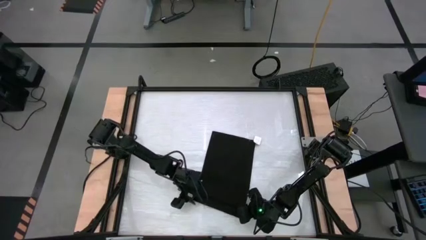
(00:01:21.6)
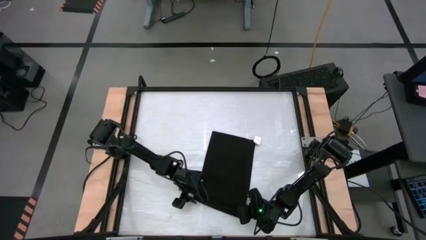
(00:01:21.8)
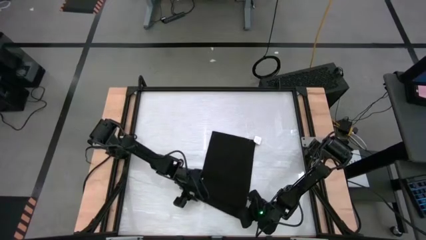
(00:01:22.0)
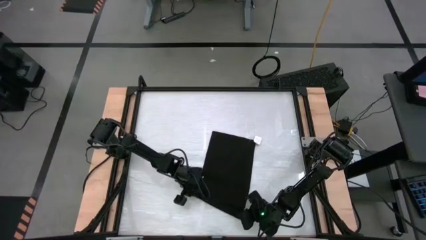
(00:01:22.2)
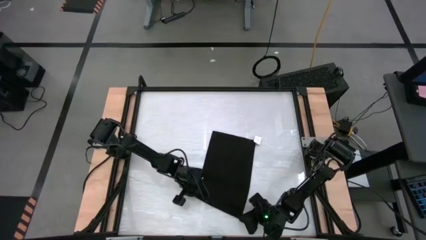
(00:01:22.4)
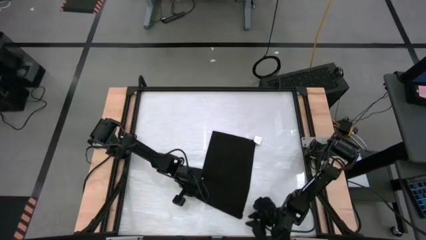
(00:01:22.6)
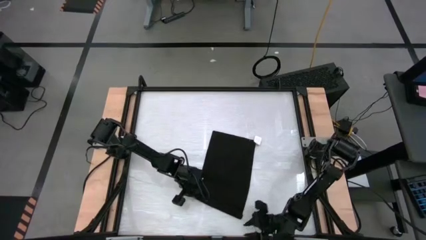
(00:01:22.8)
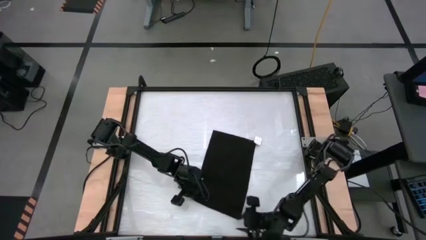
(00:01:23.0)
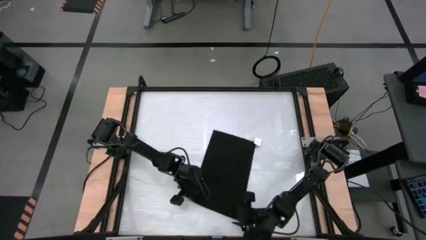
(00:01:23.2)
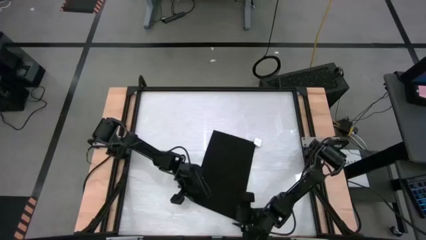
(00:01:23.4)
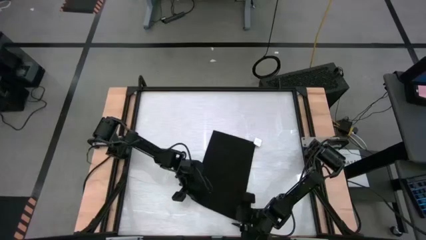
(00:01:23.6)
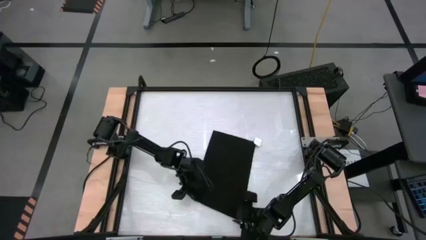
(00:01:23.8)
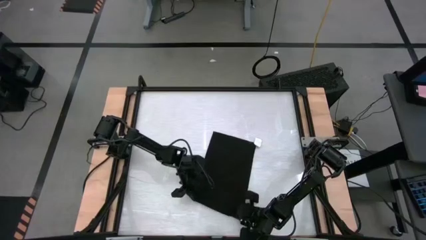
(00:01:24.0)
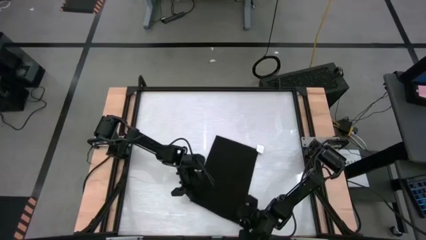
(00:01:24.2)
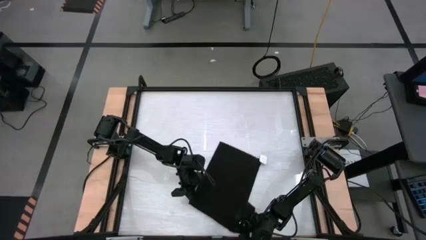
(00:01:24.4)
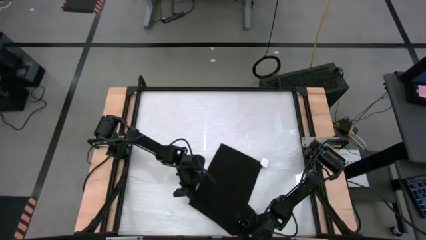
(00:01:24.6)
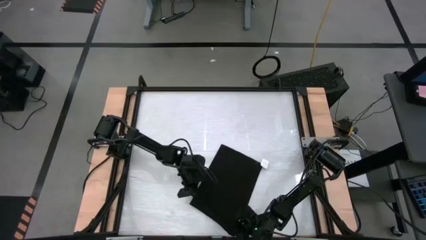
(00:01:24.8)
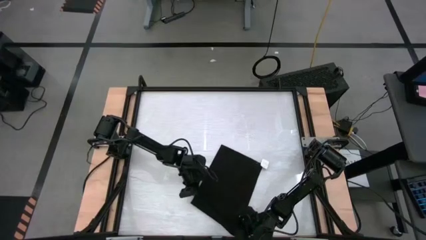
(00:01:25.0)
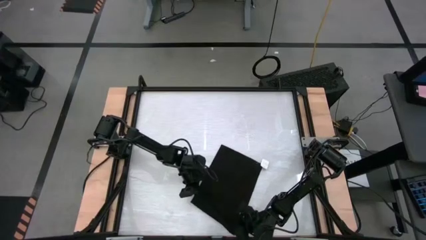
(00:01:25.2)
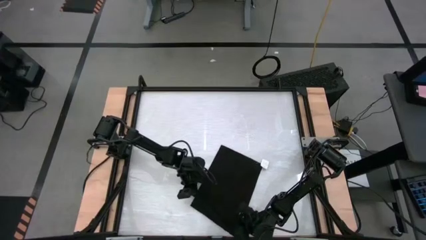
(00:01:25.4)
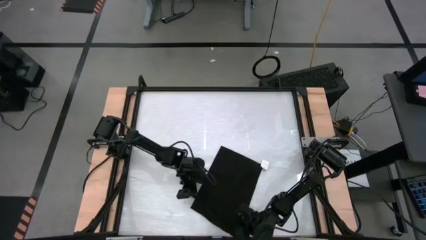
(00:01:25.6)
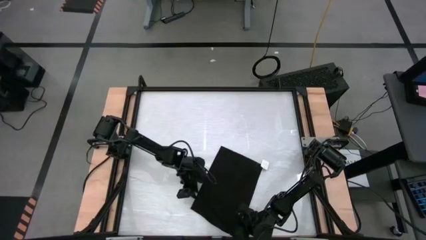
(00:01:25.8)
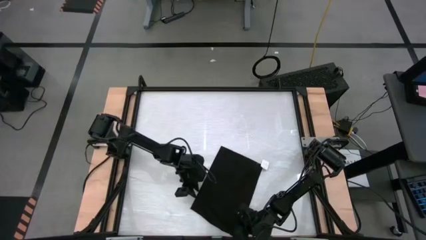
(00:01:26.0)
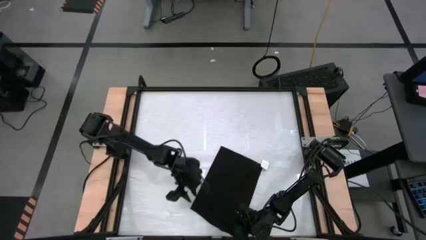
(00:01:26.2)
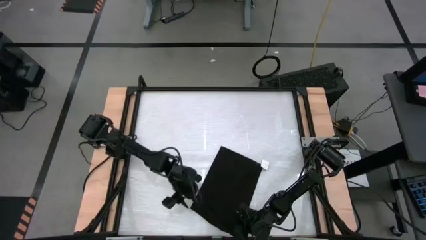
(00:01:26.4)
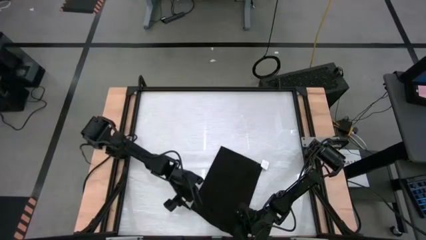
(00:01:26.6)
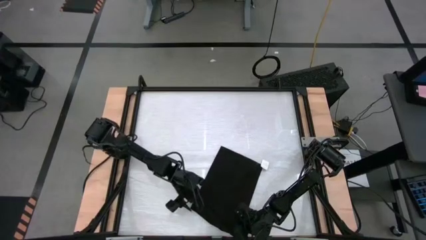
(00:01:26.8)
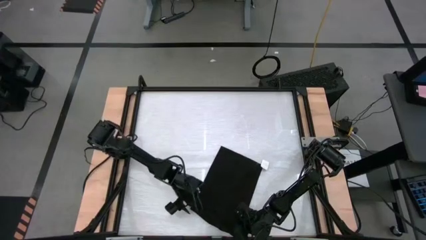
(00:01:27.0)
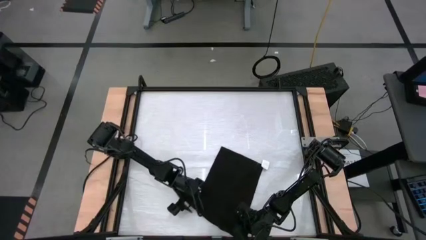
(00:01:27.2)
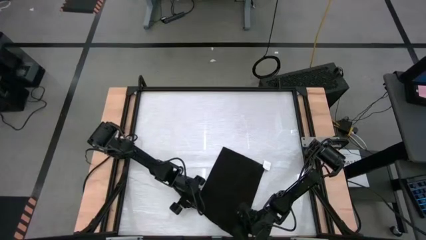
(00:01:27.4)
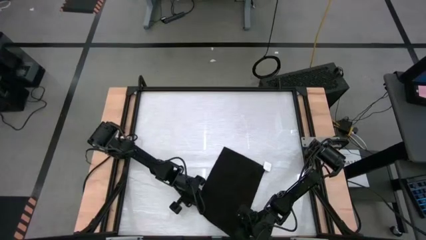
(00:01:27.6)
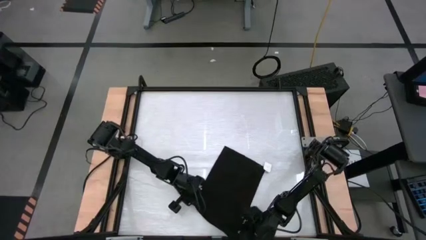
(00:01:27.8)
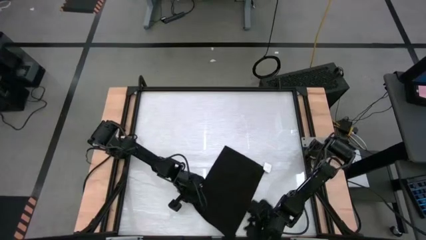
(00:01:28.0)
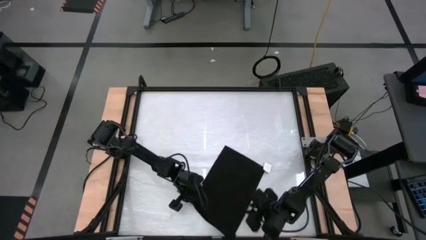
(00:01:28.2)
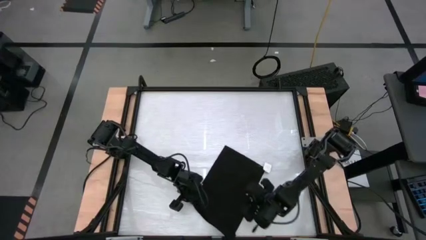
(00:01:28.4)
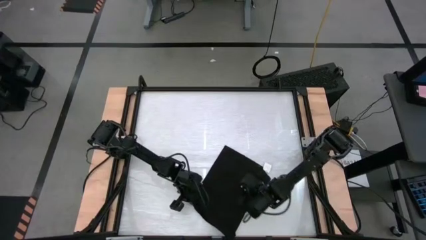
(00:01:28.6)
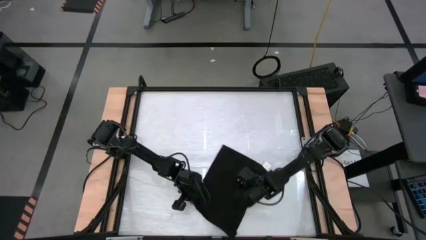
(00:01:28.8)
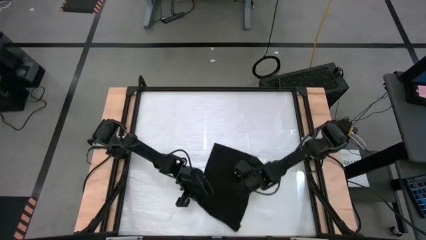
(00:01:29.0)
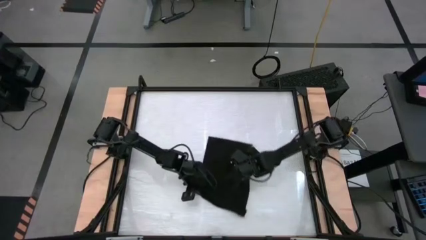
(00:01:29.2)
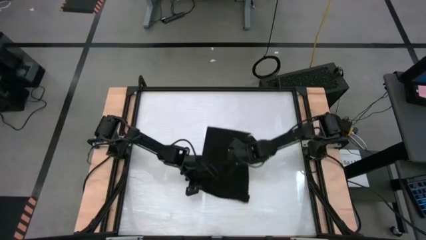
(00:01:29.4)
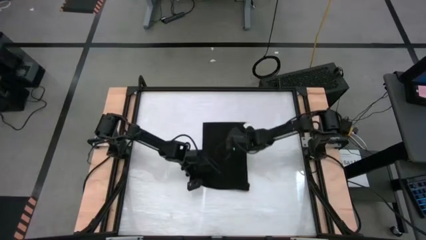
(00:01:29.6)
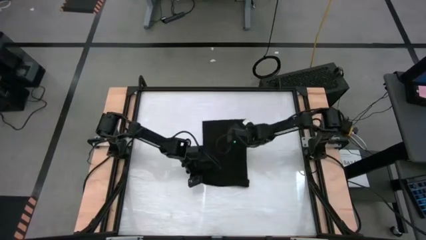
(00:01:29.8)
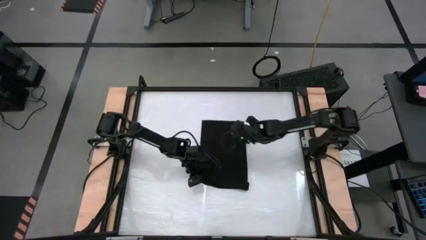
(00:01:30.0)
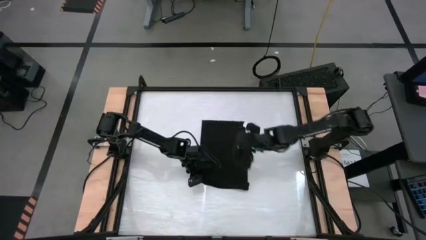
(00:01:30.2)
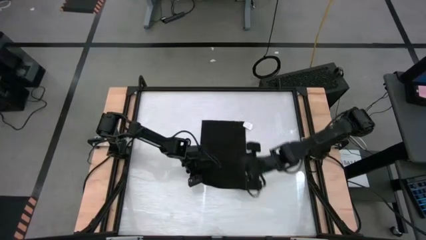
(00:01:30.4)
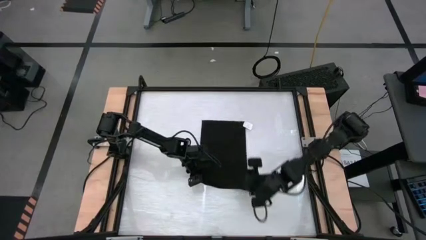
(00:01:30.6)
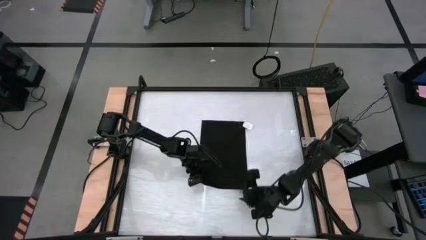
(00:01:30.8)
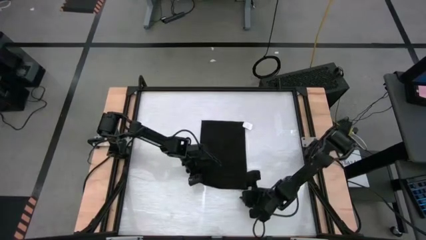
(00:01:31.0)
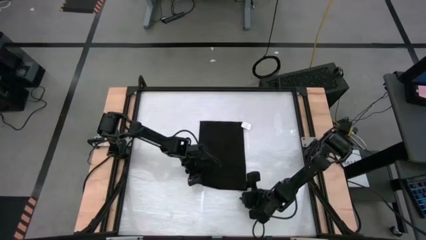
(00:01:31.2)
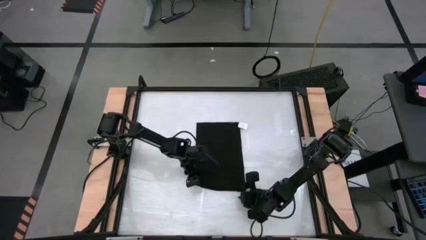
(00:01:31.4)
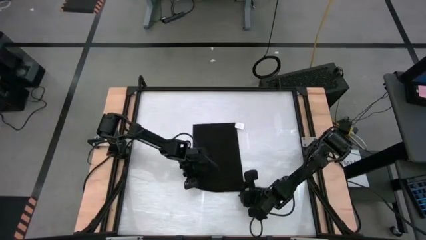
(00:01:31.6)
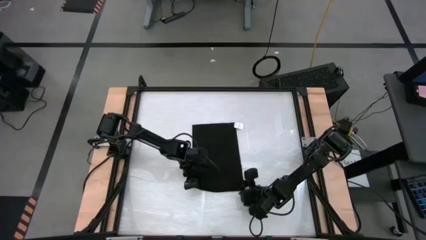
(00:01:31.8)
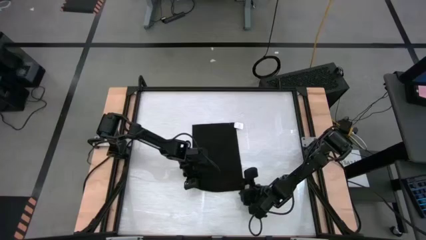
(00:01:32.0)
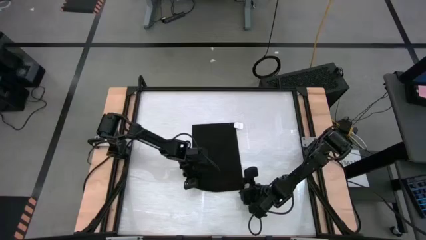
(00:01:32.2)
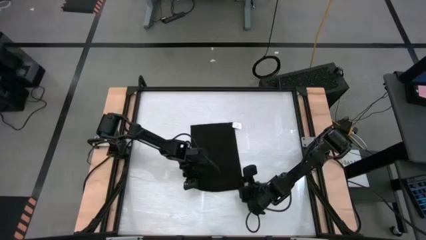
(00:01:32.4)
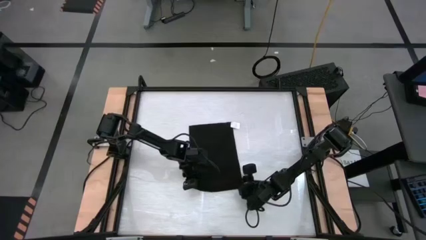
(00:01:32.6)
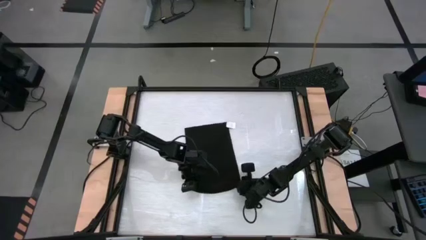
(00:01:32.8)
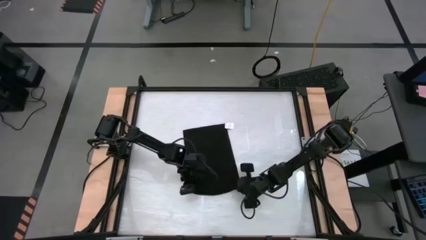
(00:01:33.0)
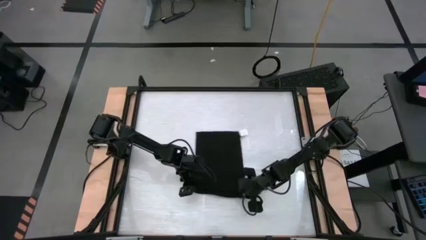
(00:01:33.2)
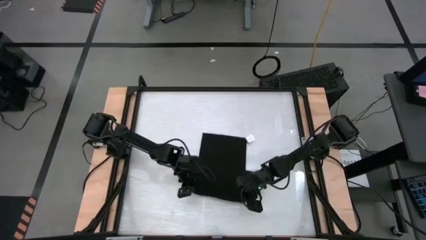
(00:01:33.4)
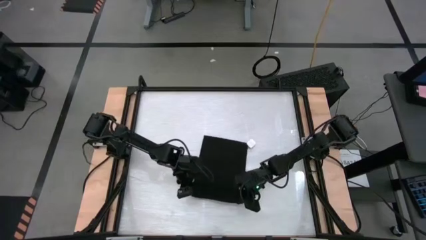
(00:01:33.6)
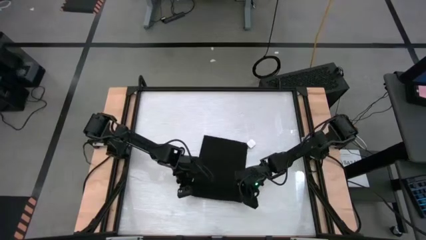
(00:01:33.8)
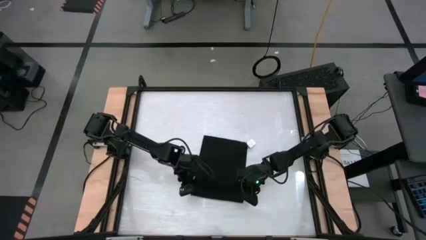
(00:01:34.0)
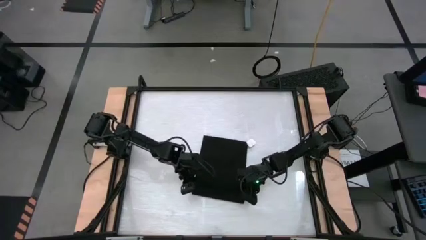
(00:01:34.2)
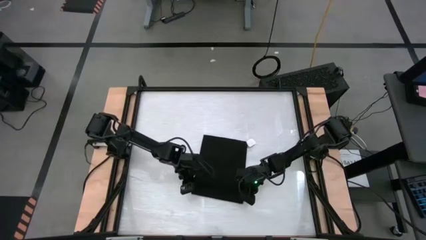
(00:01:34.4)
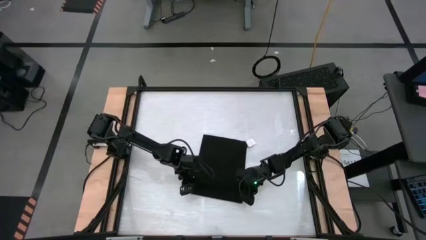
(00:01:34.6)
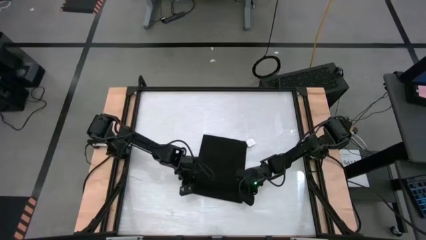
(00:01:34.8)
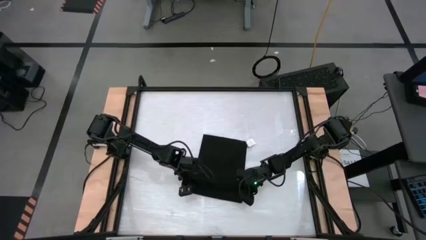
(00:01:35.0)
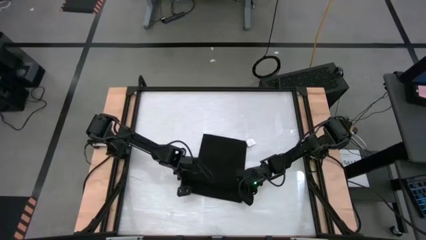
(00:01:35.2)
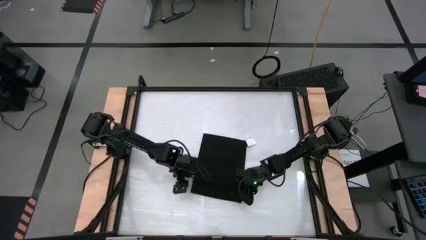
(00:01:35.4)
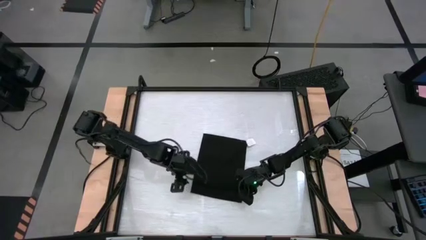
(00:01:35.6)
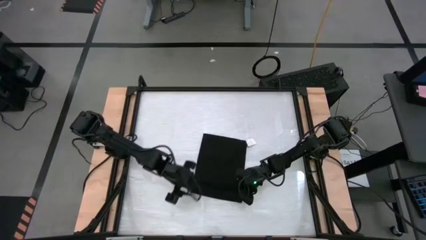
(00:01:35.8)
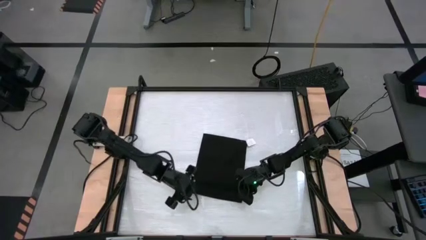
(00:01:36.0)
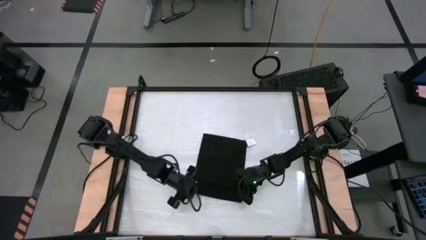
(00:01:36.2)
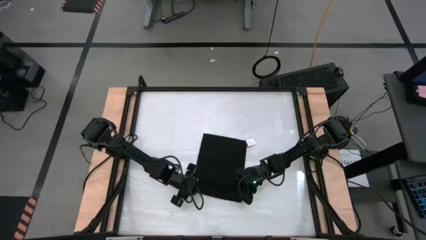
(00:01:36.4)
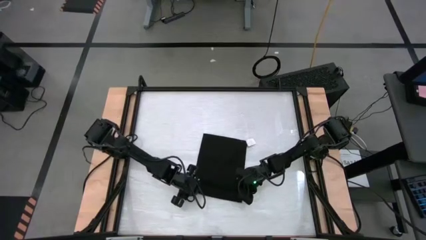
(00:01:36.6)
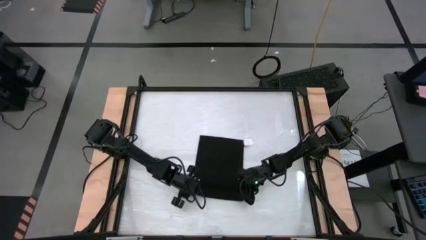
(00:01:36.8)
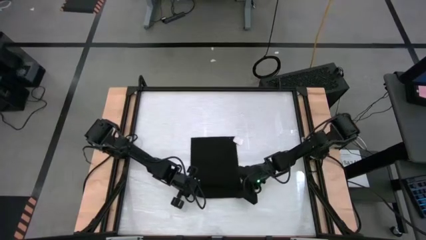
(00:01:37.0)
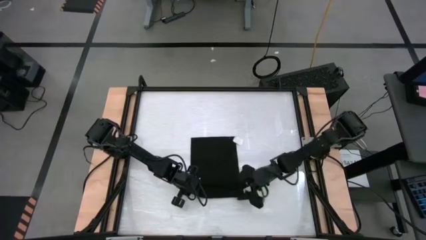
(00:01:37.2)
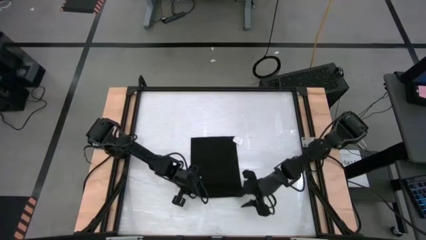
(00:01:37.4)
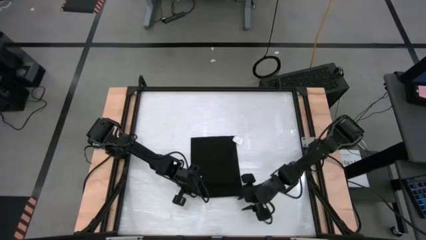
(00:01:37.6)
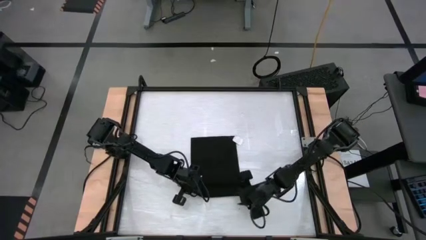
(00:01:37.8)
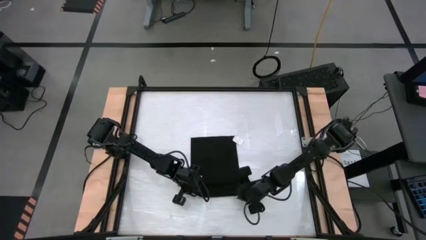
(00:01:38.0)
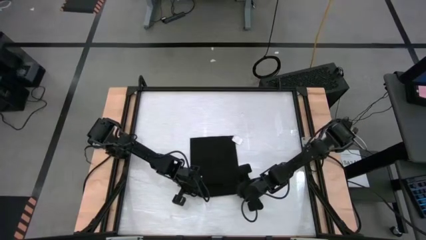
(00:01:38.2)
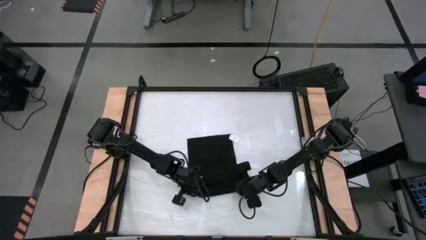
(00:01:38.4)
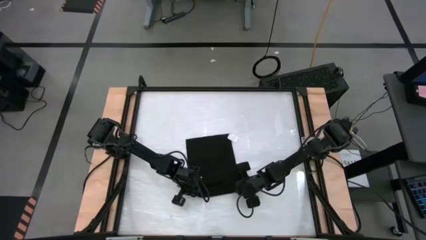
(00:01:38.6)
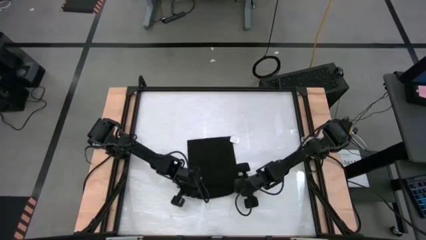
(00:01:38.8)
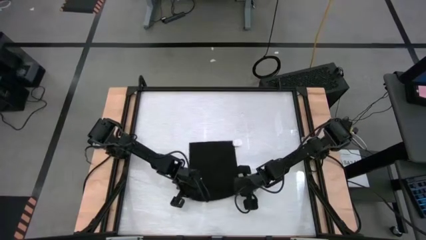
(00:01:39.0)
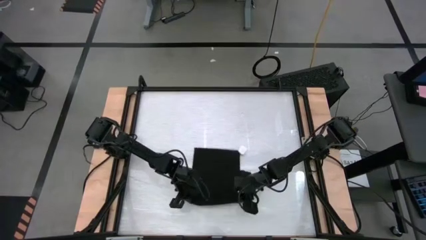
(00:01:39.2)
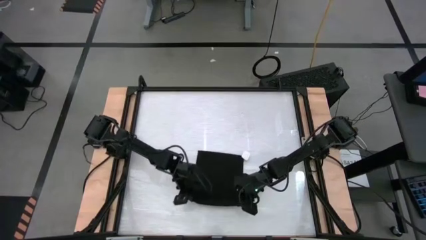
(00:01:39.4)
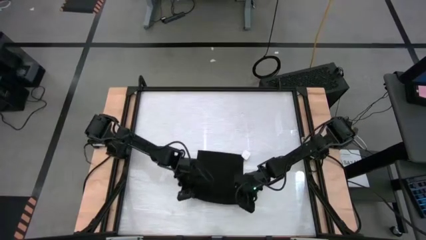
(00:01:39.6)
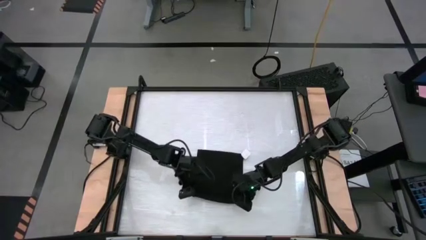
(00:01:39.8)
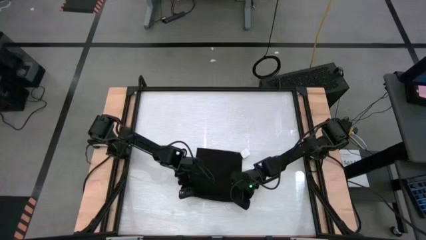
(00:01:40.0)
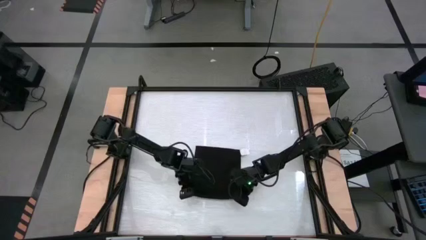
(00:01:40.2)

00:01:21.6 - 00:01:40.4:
Task: Roll napkin
Roll the black napkin
